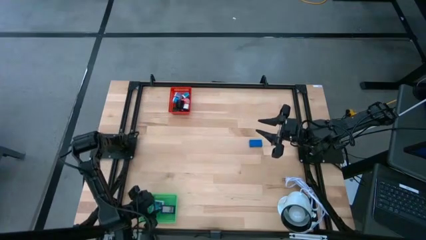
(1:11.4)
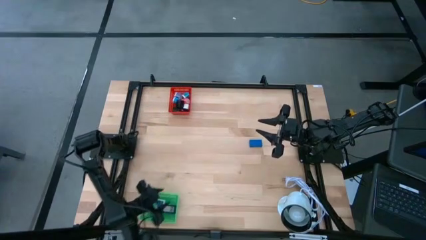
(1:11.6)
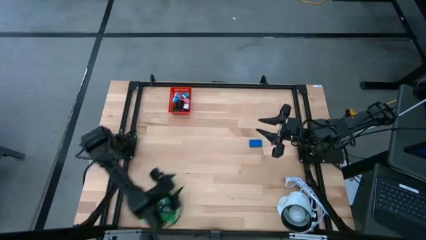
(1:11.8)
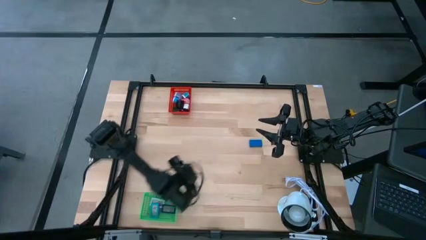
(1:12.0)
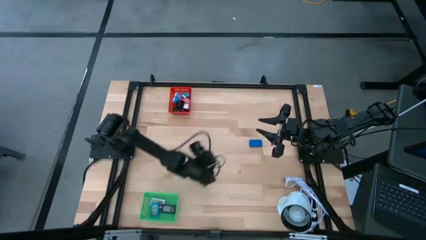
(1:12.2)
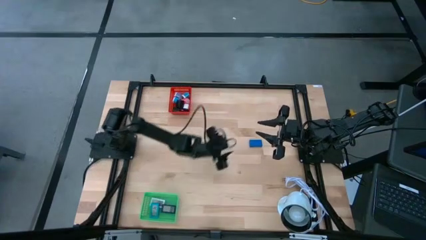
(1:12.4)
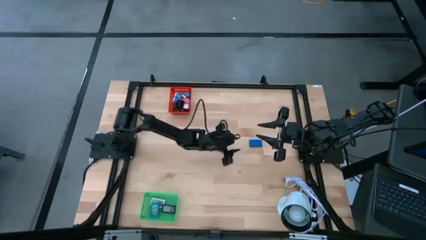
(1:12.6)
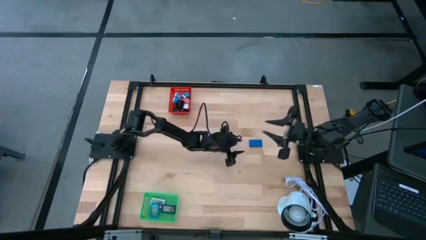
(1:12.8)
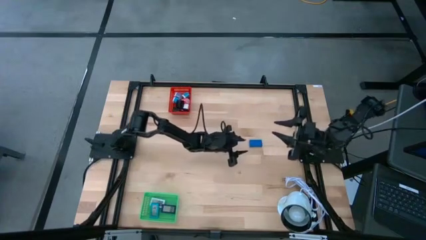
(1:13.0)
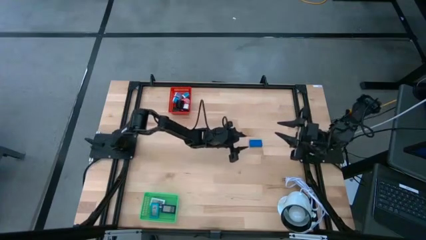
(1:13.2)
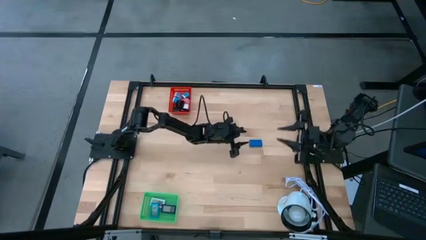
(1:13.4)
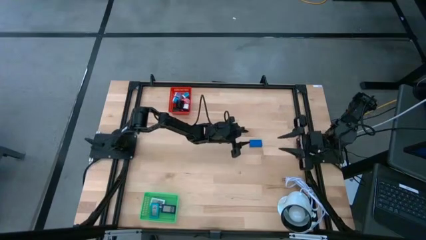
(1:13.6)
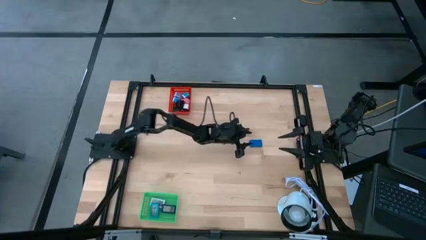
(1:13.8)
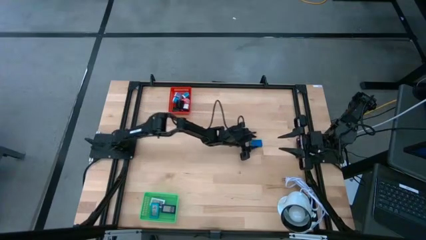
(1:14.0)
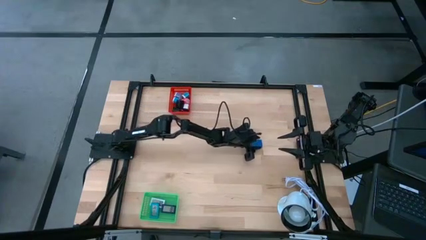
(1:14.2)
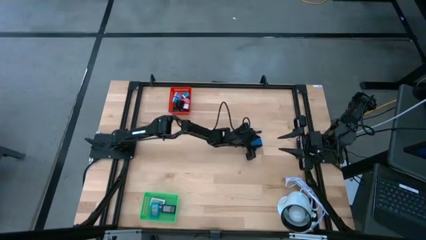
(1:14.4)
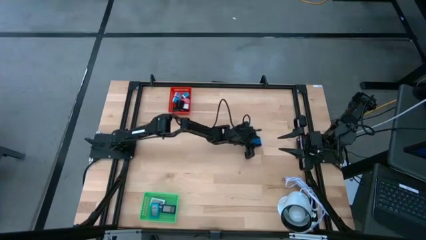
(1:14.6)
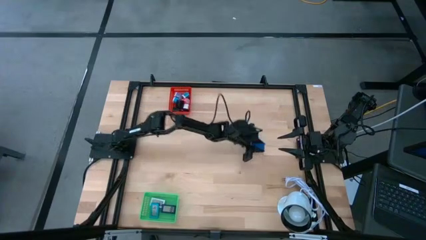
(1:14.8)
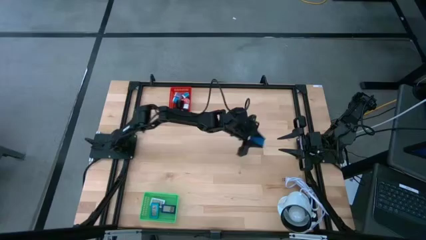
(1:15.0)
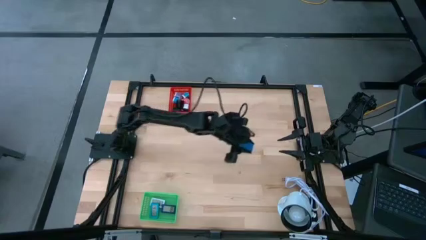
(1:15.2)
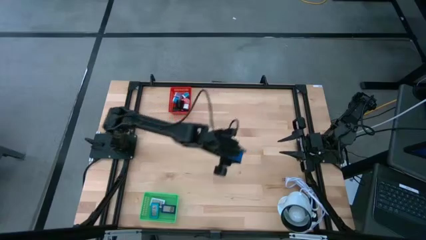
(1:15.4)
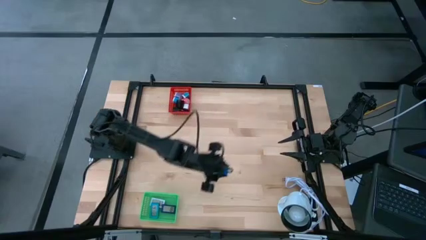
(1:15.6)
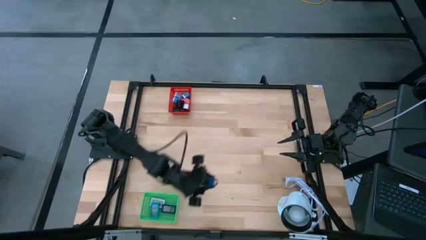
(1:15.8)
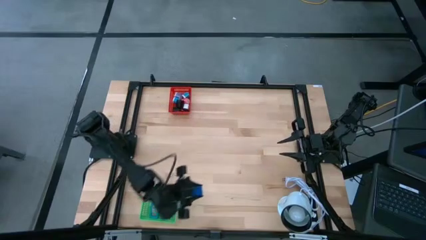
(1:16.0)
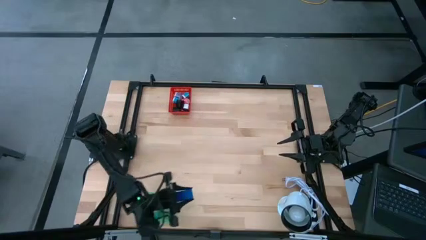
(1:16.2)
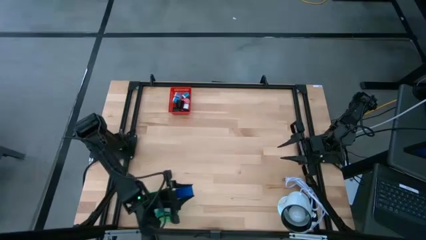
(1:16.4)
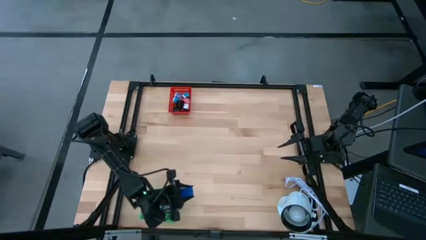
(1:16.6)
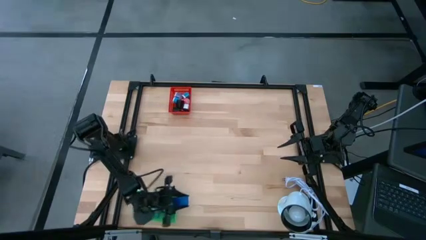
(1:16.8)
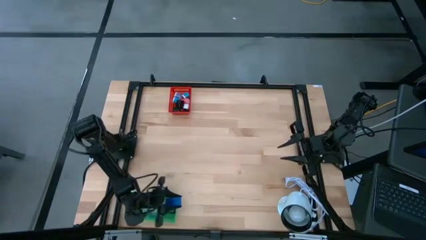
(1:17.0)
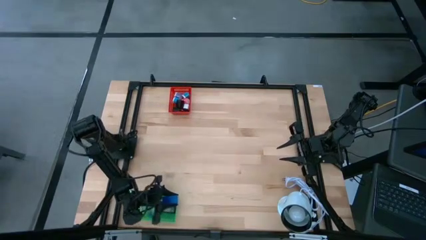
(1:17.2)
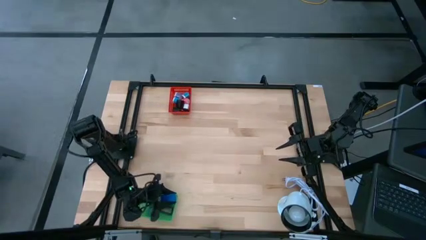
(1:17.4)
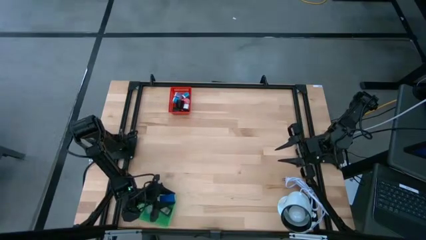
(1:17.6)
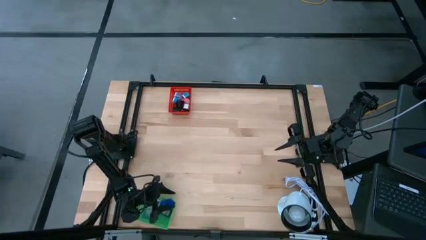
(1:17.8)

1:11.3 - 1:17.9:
Task: Pick & Place Office items
Put the blue digital clock into the green bin

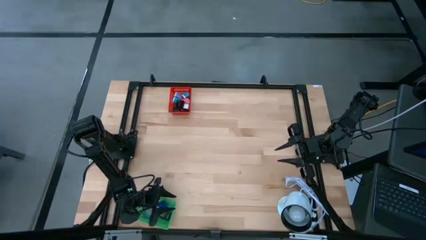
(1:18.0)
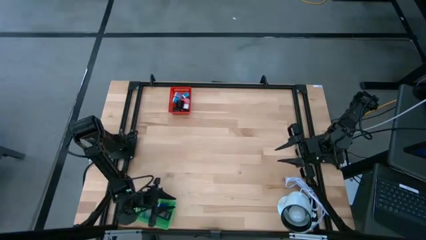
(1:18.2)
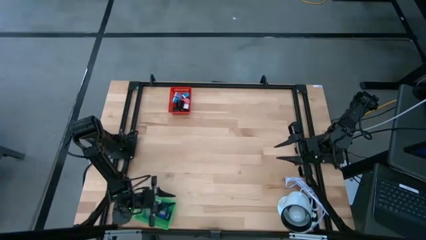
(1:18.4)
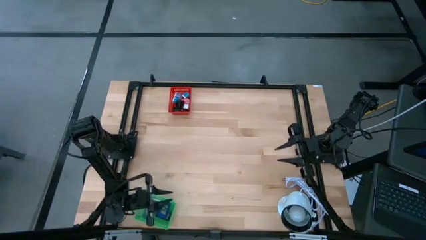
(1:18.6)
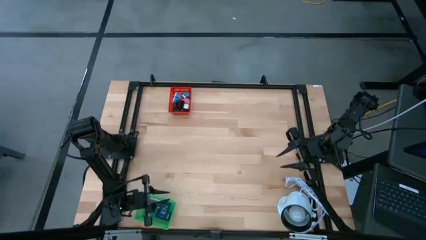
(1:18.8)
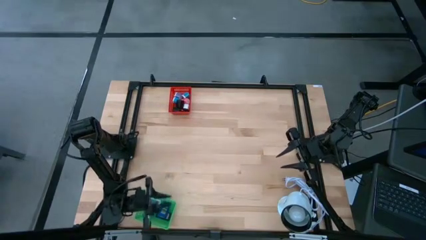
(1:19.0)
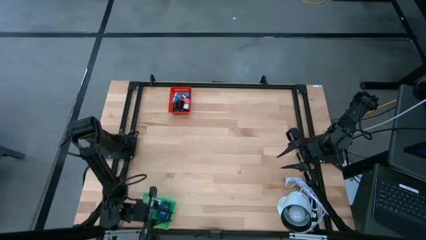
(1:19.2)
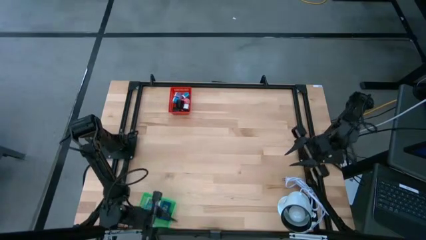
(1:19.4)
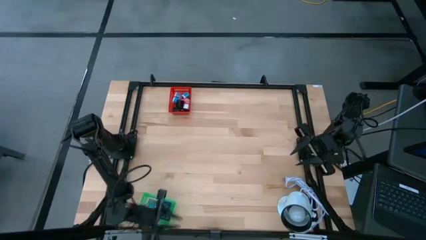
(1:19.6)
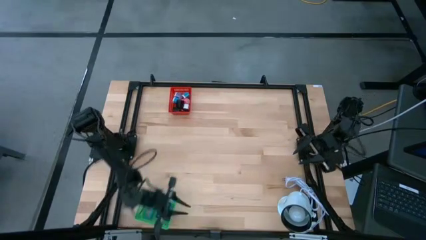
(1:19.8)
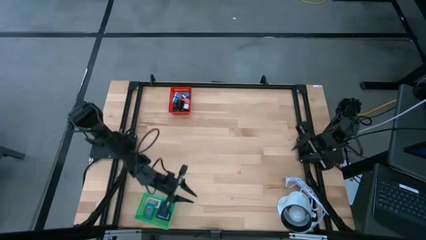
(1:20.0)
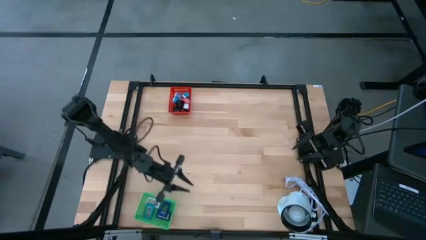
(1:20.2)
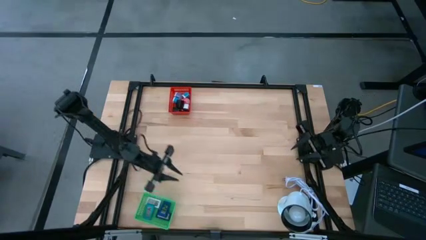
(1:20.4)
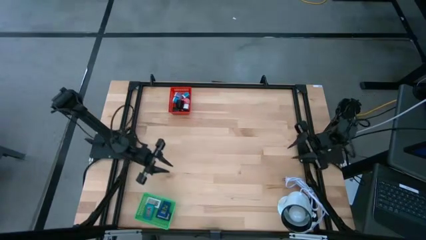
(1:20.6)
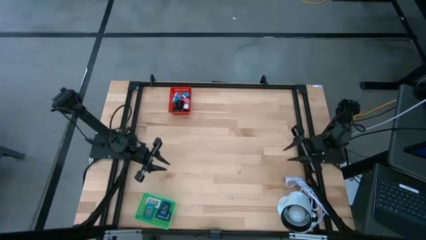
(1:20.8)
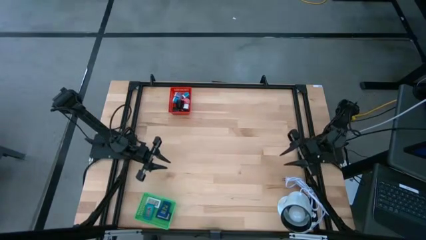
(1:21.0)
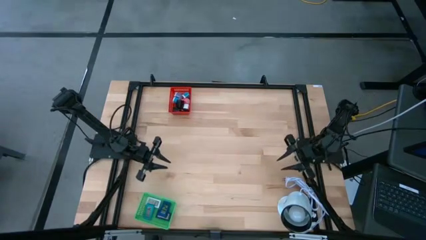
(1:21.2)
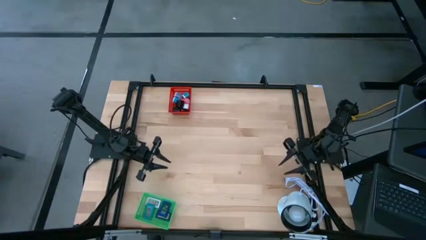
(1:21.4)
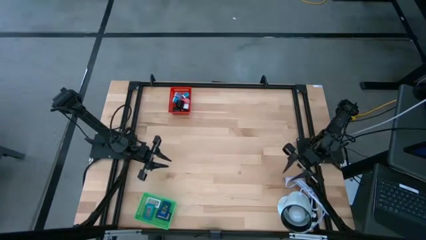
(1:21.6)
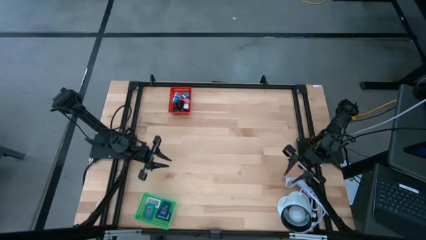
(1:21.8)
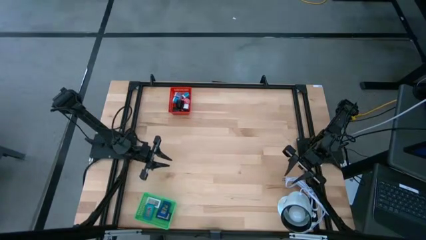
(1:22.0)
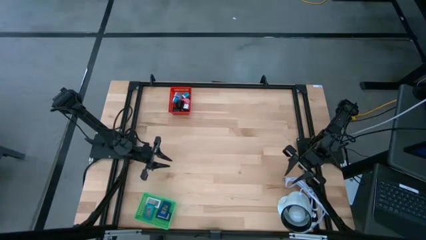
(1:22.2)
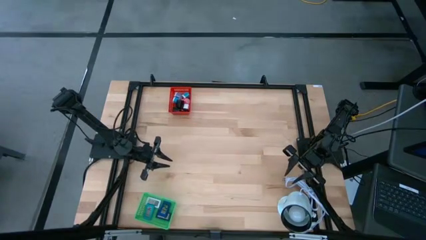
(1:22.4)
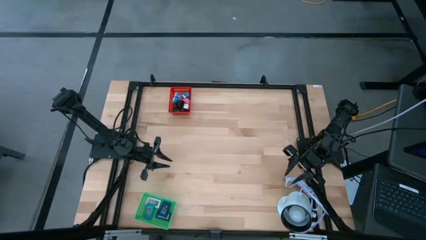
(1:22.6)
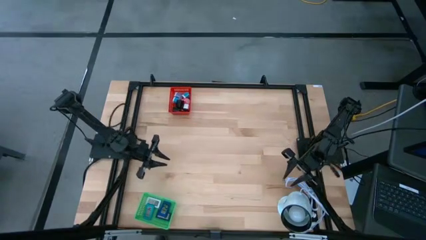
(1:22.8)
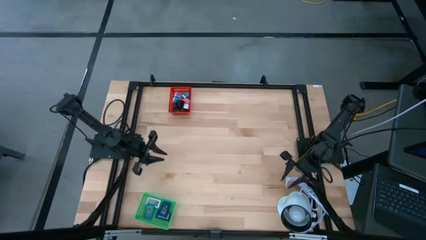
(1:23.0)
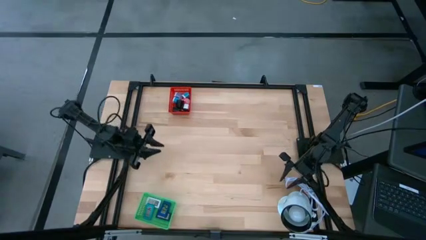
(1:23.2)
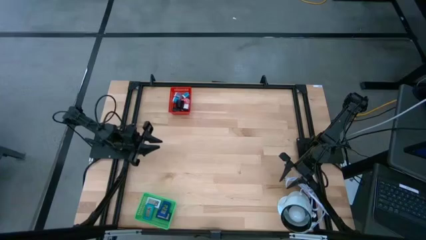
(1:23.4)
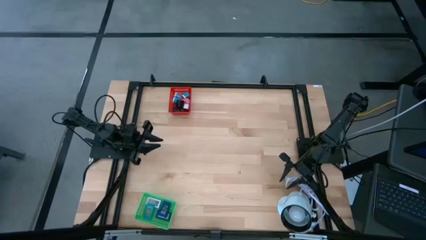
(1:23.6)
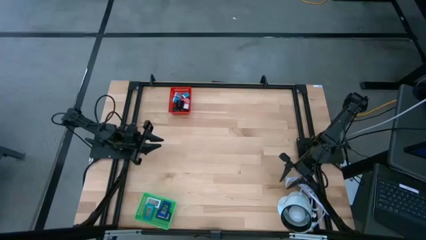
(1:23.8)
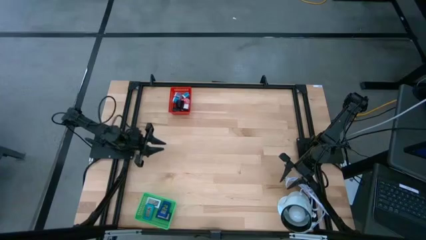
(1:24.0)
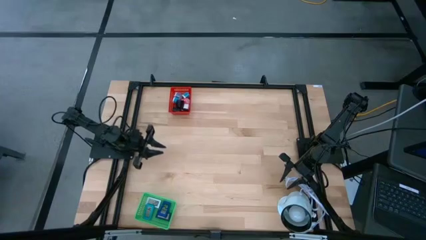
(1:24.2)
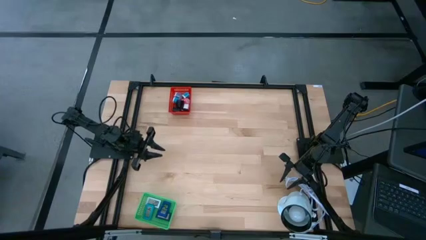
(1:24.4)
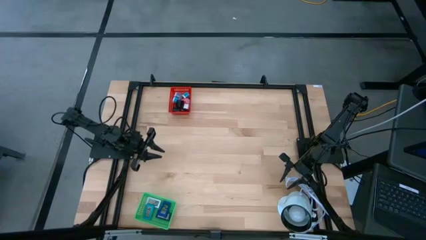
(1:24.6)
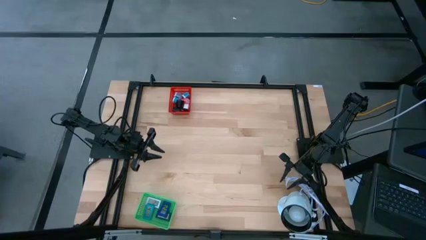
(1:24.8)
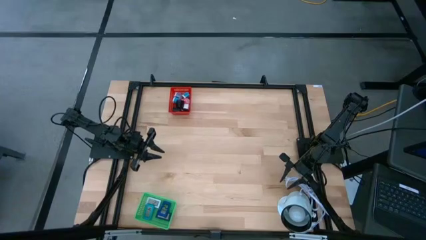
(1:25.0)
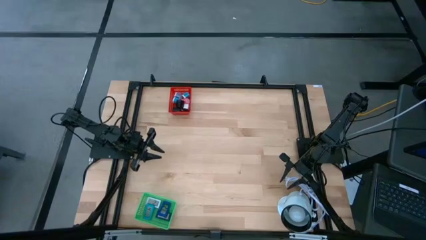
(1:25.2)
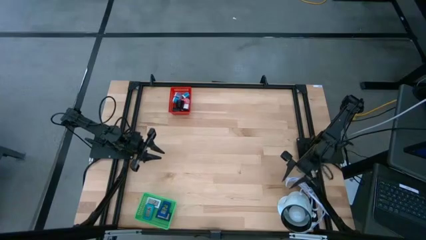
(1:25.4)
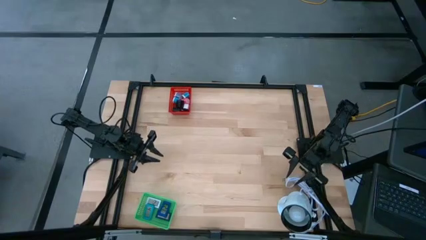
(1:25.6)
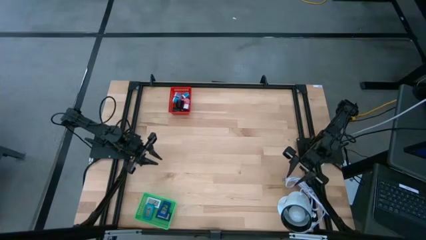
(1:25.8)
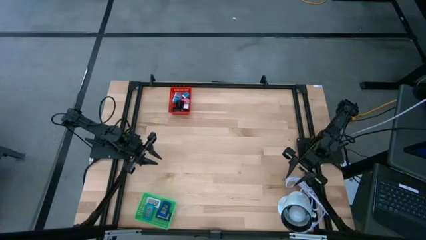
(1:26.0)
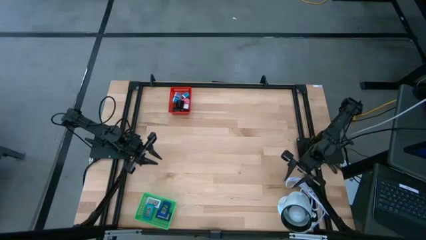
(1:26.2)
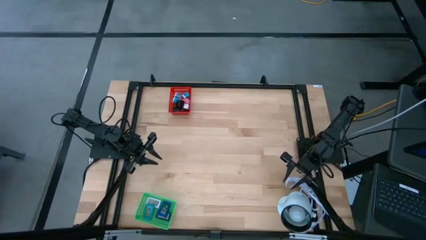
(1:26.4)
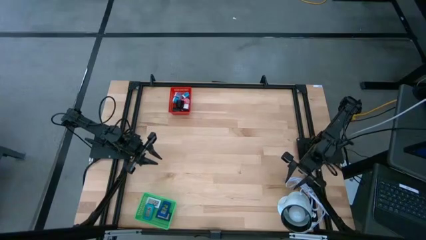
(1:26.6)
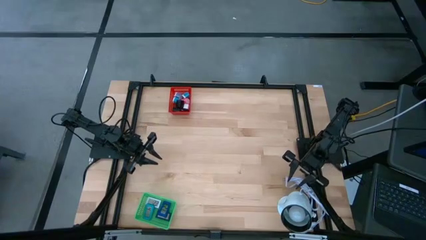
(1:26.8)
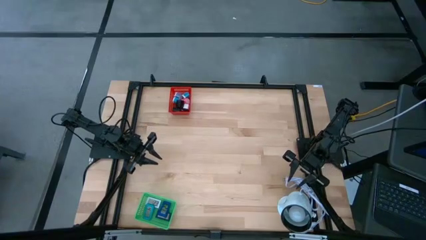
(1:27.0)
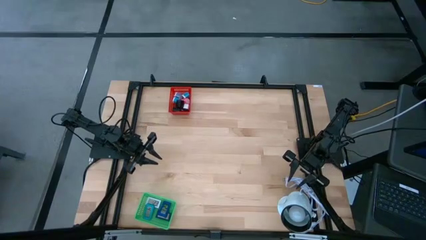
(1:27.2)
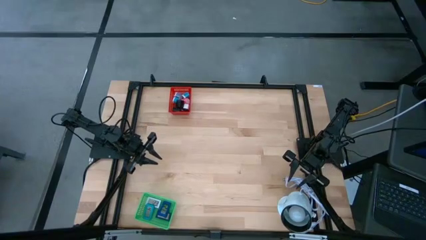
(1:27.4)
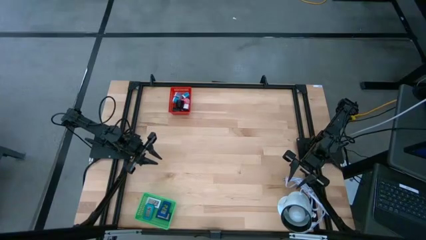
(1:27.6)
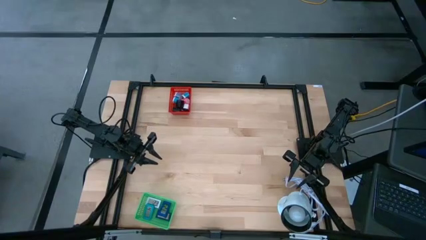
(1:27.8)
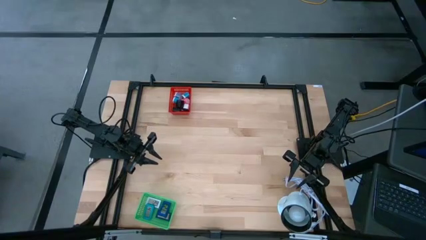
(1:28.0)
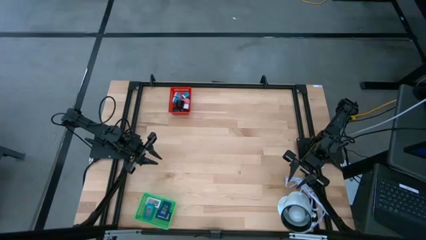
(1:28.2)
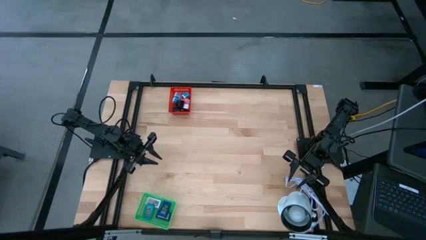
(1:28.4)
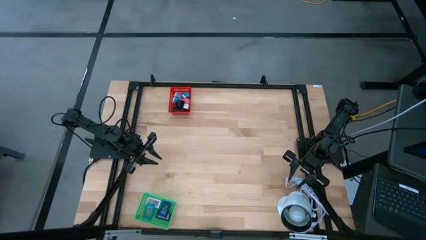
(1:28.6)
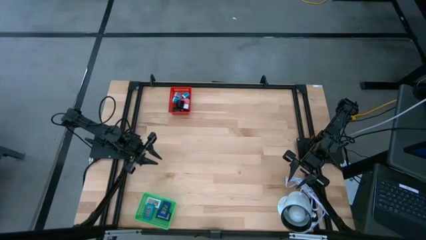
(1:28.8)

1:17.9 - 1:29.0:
Return to Home Position
